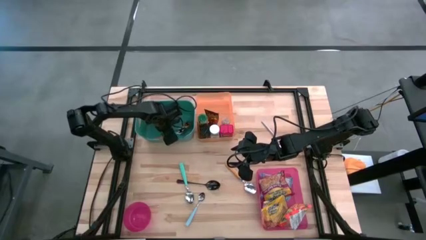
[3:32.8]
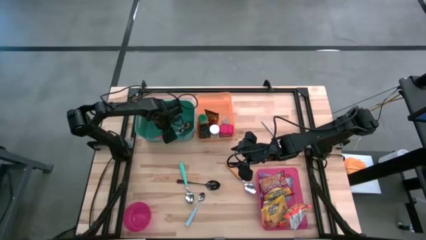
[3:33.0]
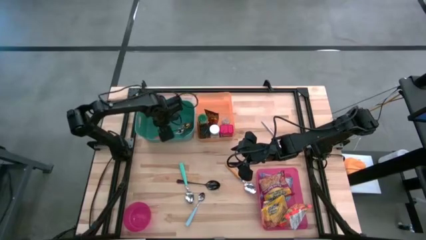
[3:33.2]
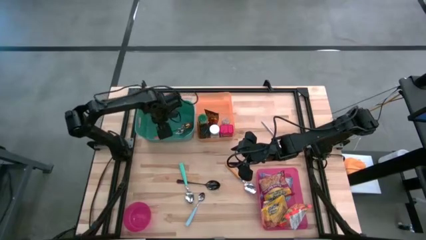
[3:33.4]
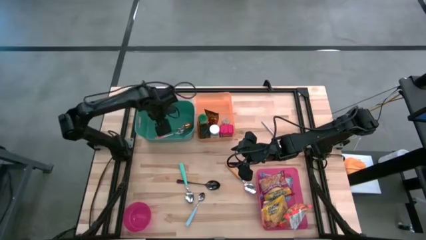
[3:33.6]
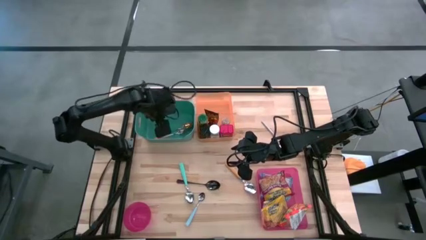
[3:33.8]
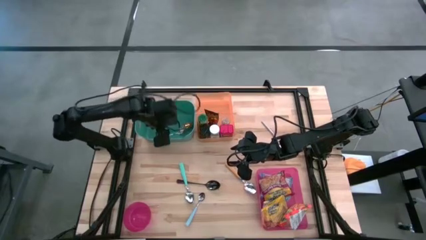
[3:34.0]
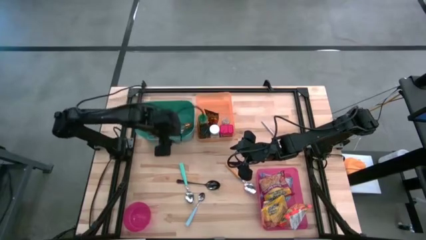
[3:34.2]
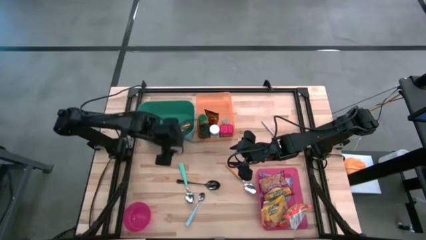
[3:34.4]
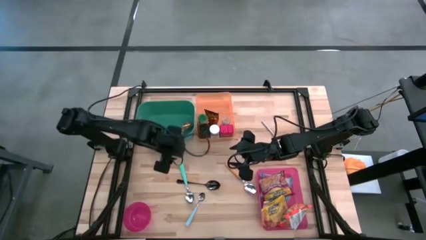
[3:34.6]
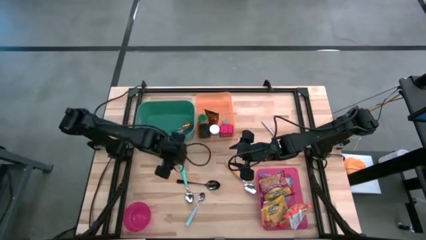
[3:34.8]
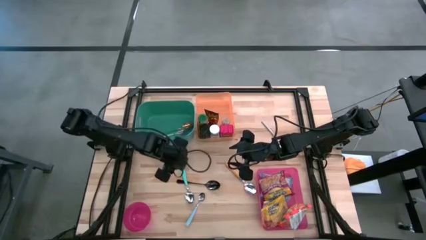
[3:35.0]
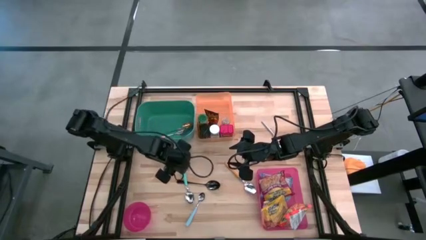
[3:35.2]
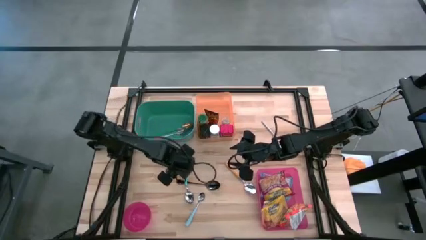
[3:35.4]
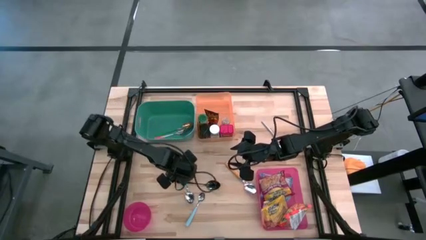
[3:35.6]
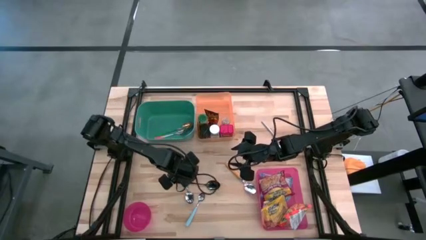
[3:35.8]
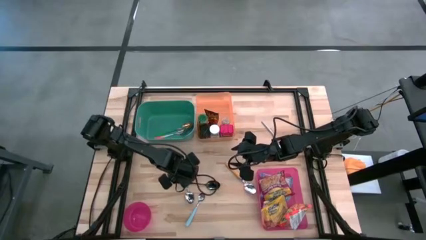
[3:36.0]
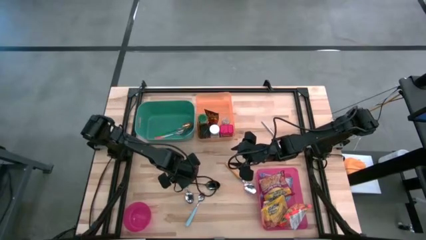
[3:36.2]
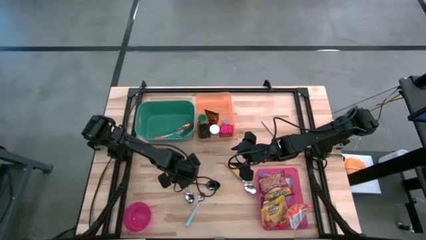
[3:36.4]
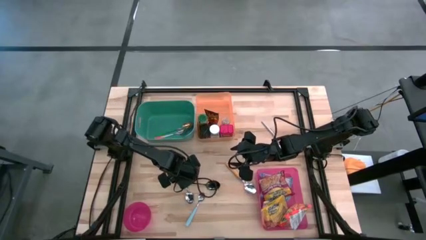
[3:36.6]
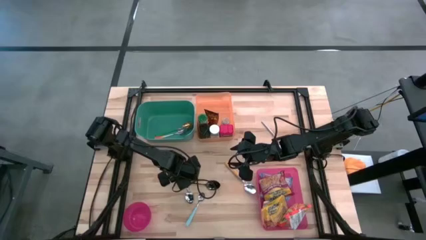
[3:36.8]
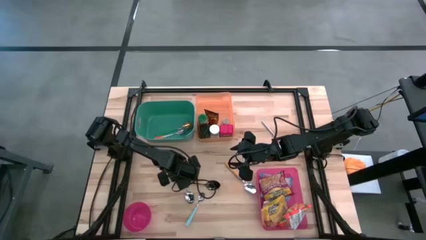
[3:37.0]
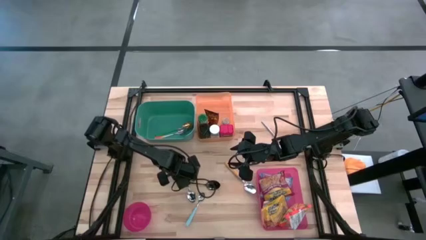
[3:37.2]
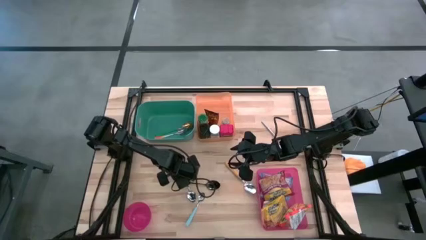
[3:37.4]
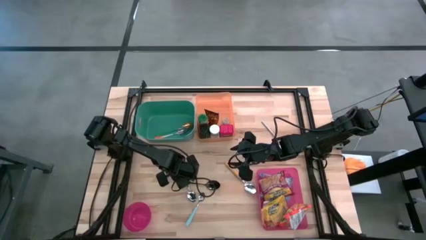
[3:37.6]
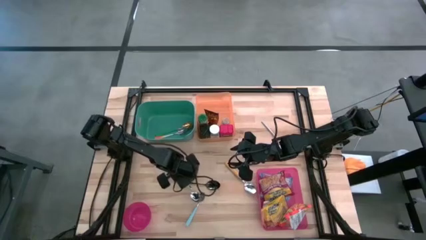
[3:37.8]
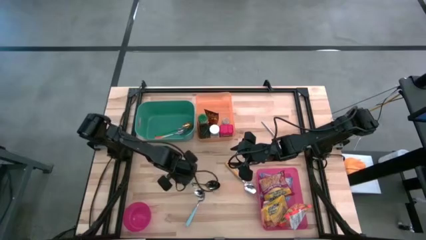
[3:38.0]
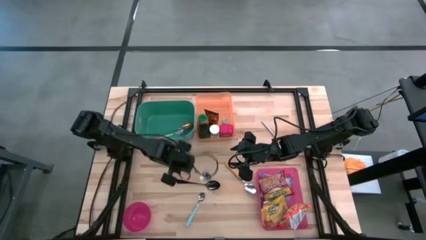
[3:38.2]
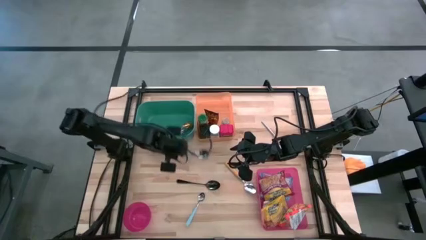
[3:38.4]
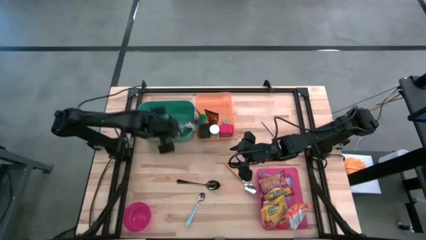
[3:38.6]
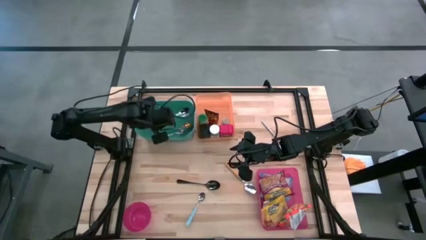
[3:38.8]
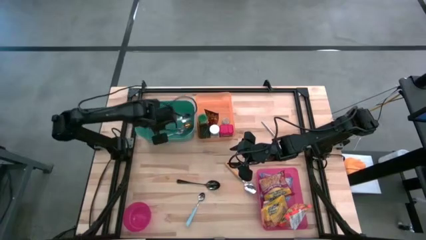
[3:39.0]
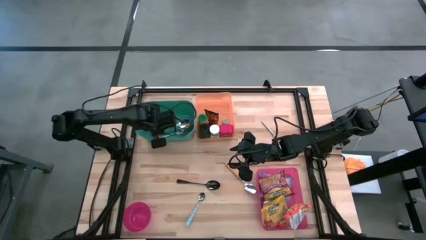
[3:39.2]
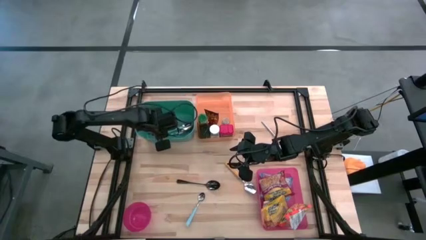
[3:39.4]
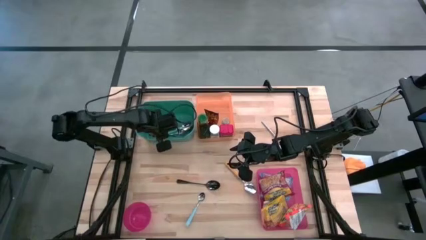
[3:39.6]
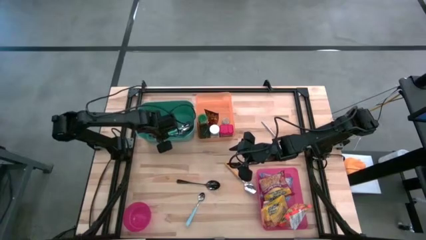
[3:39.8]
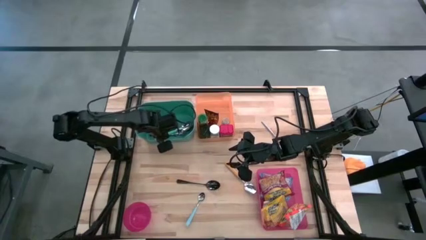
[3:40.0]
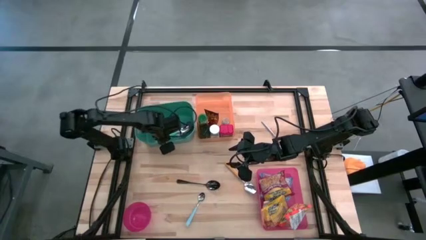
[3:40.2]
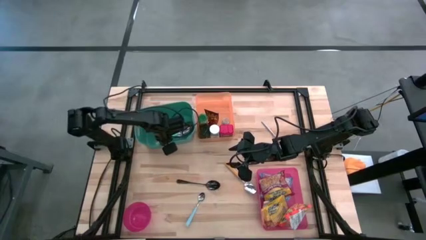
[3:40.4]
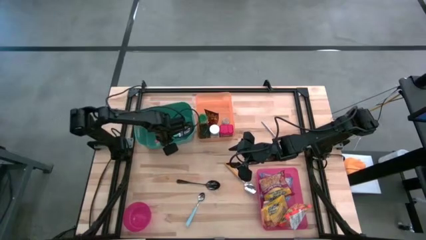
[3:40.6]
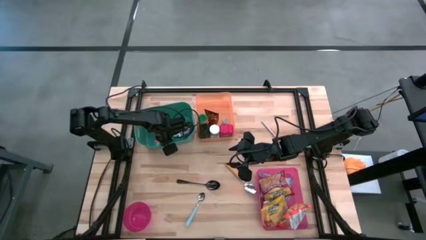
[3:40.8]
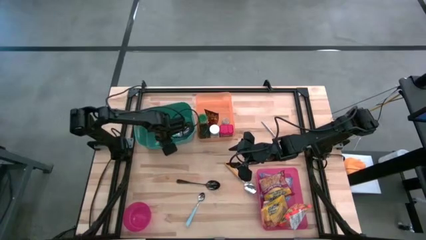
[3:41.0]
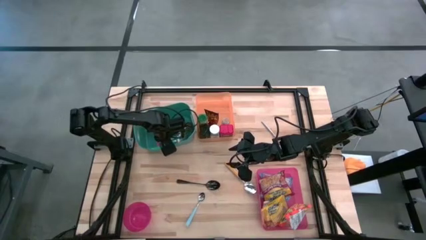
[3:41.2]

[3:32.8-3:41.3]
Put the top left light blue spoon into the green bin

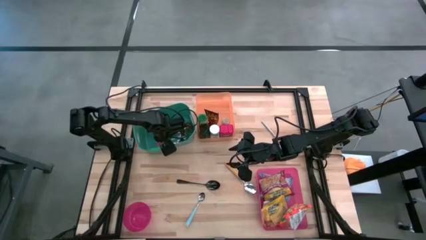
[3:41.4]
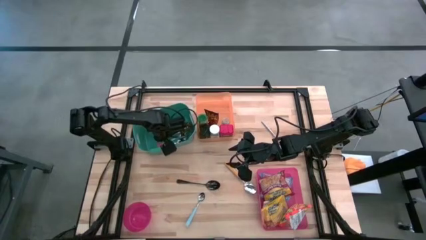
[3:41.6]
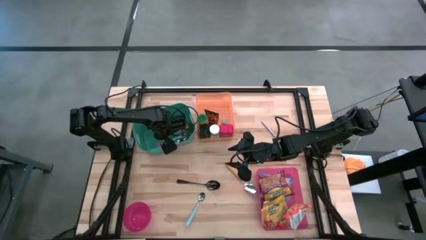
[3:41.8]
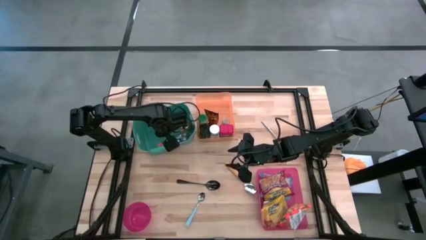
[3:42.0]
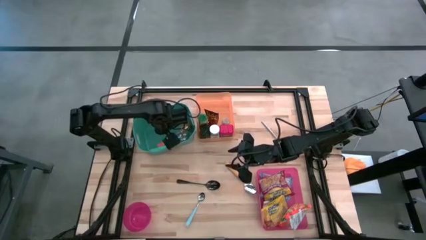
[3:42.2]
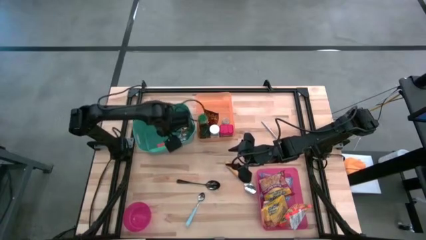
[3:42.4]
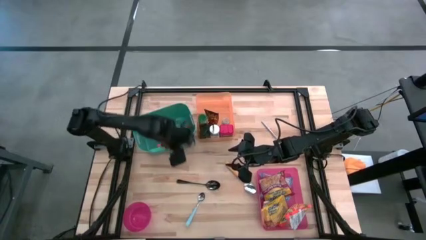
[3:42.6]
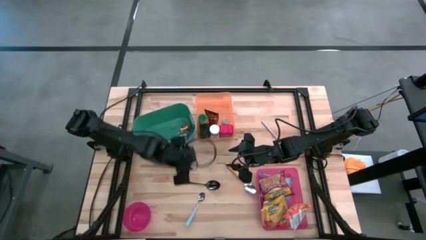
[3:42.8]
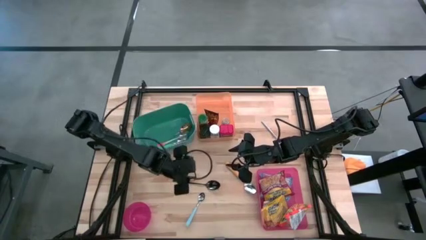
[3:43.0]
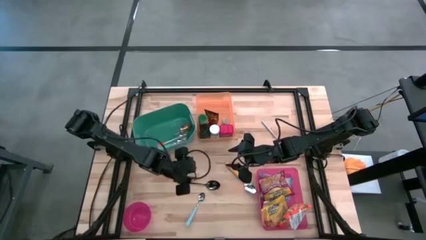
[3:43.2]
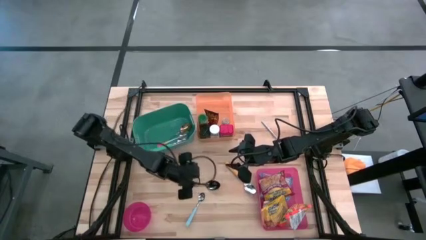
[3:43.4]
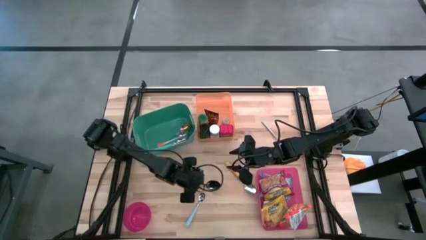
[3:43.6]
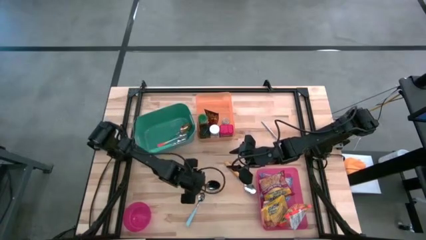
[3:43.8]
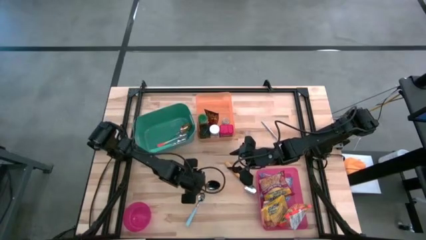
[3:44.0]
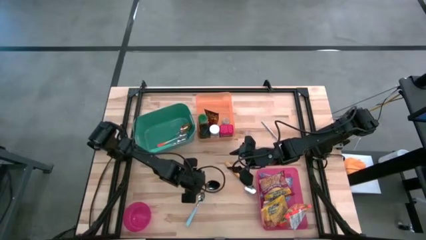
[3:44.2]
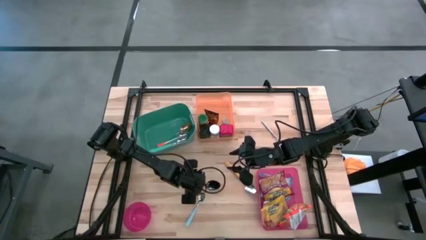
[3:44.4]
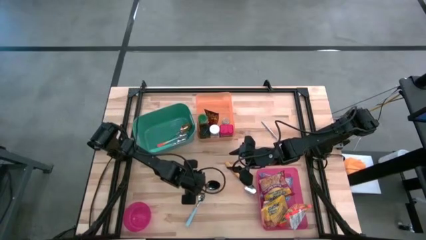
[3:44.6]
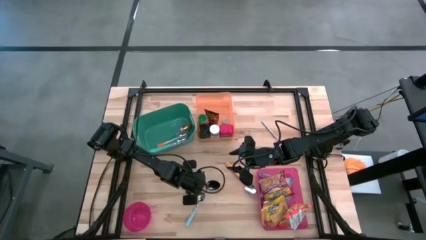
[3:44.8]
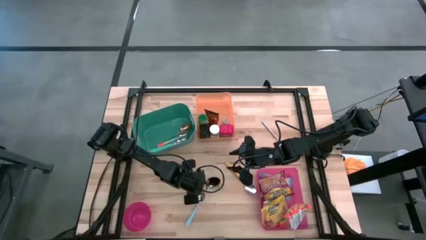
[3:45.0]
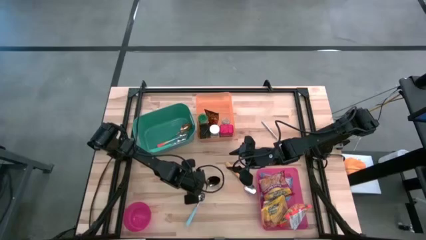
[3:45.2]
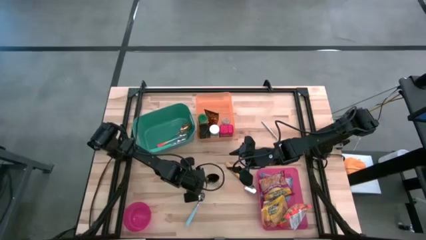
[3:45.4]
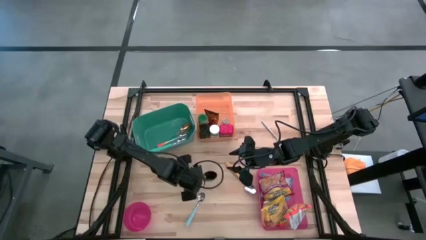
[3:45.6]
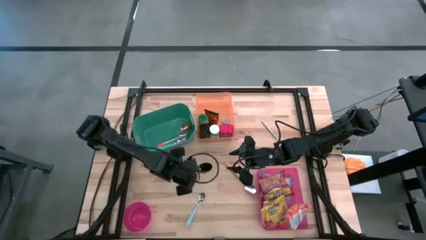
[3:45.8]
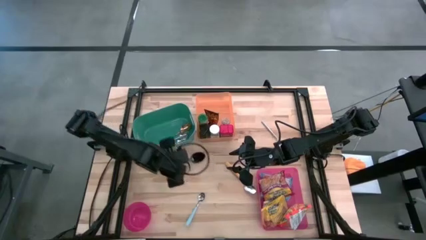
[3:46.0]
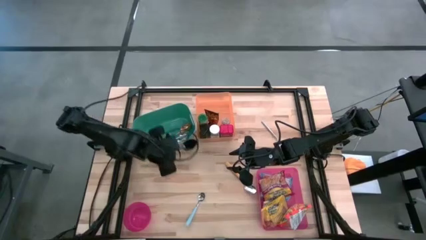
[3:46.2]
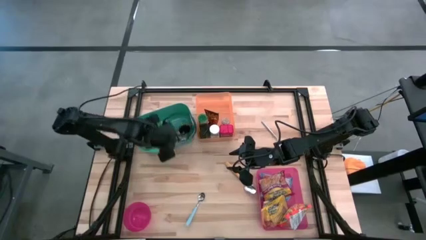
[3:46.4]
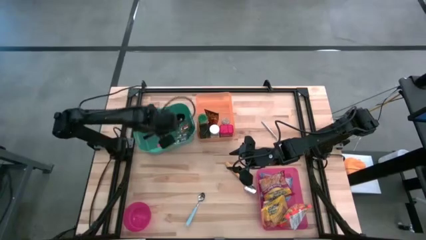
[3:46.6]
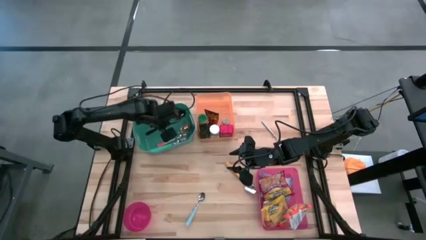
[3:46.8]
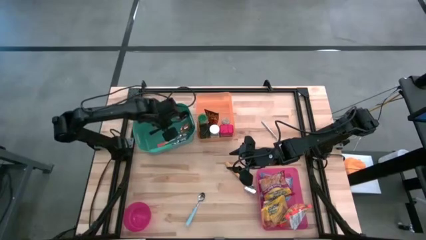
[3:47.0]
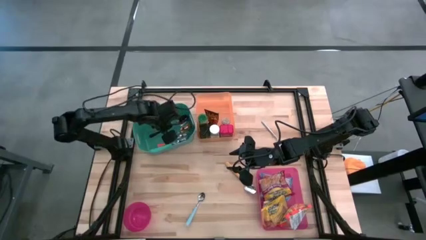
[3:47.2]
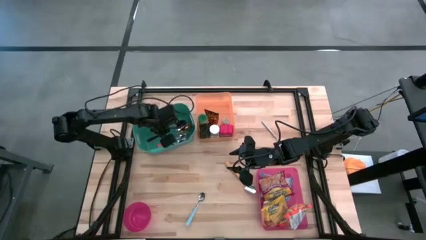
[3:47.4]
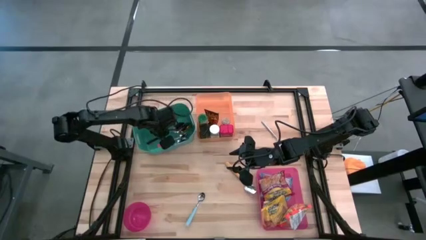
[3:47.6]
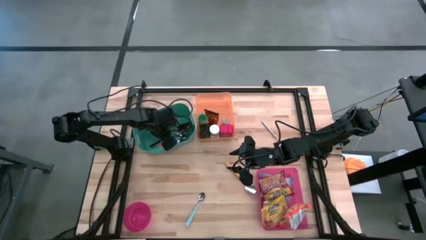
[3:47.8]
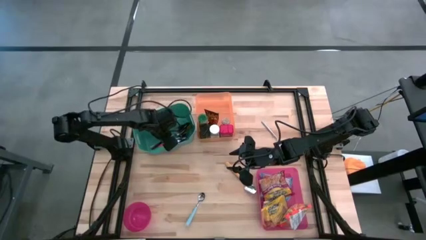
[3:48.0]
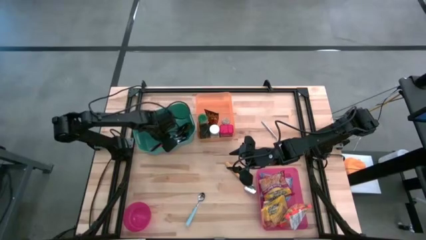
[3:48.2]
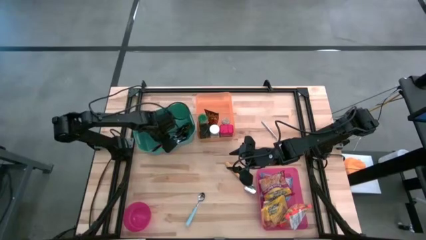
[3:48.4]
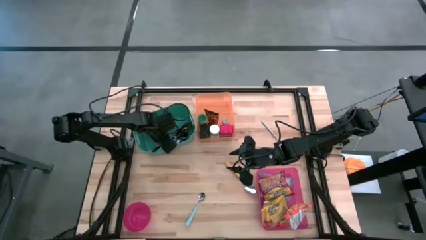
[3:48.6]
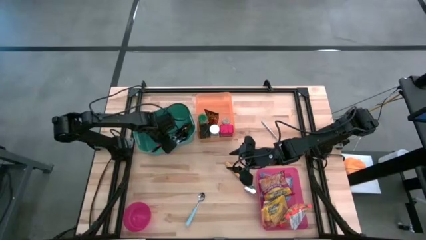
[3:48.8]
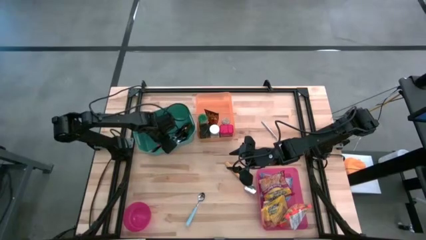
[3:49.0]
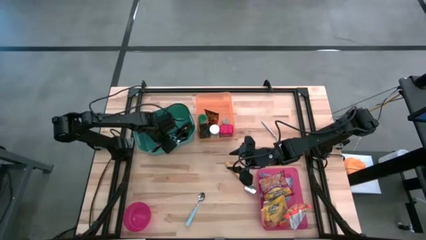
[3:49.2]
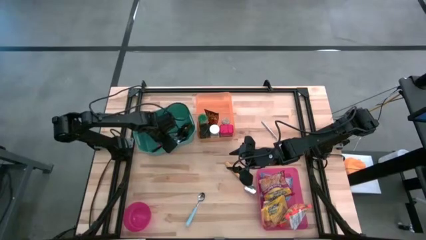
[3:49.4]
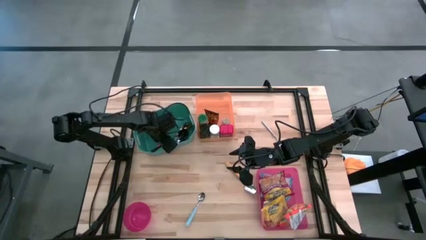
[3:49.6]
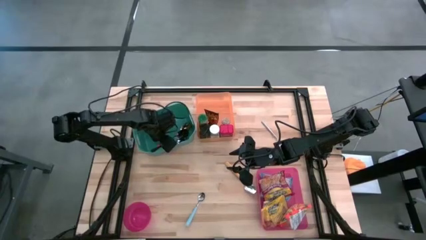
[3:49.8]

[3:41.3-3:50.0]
Put the black spoon into the green bin
